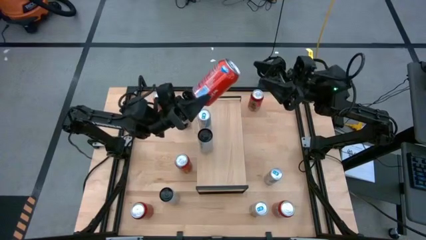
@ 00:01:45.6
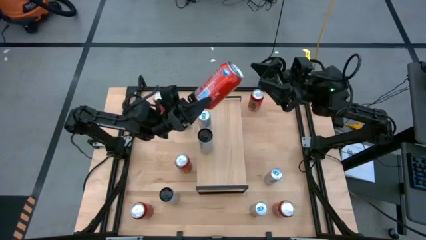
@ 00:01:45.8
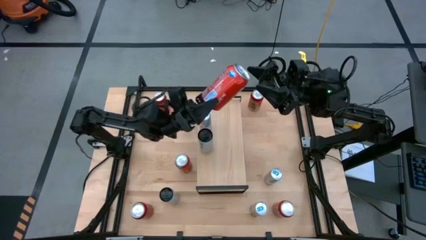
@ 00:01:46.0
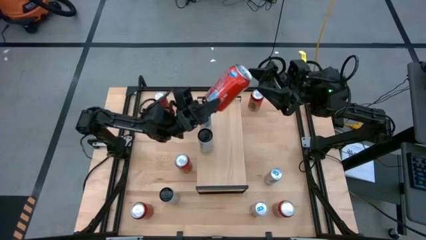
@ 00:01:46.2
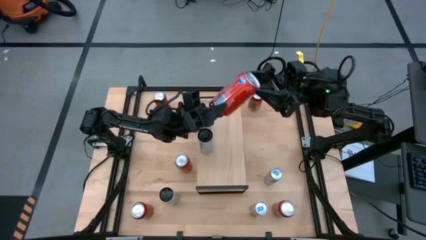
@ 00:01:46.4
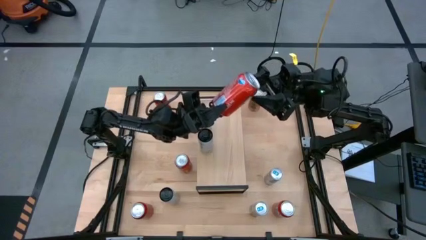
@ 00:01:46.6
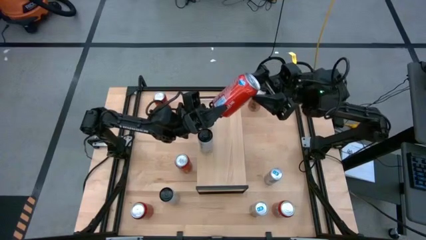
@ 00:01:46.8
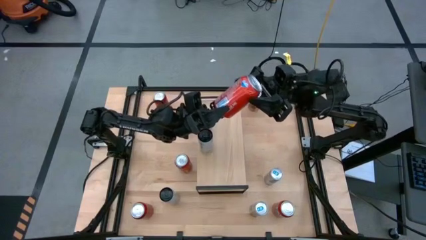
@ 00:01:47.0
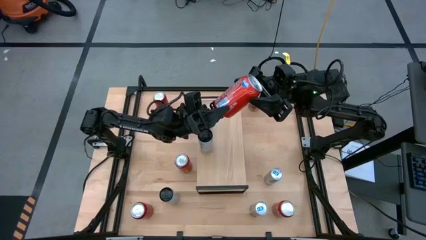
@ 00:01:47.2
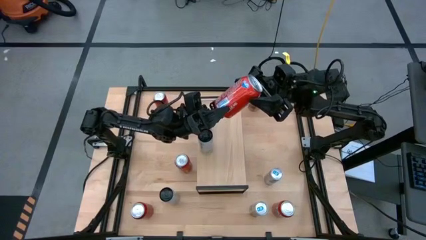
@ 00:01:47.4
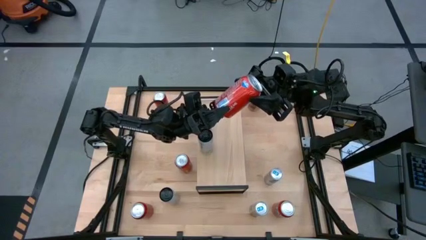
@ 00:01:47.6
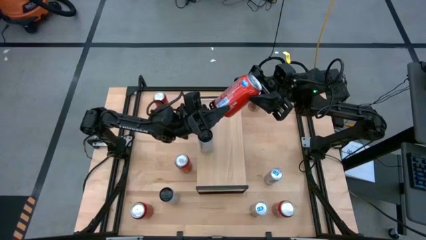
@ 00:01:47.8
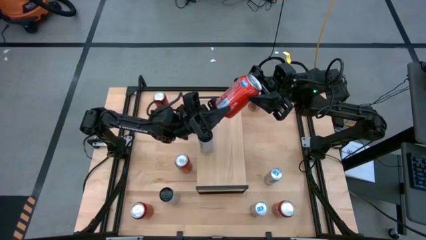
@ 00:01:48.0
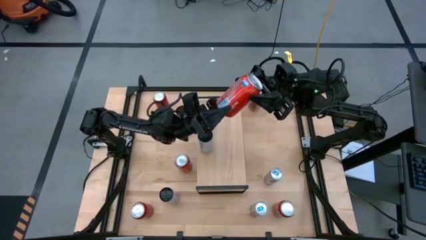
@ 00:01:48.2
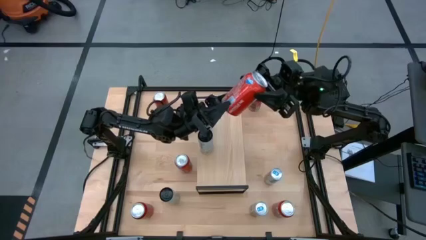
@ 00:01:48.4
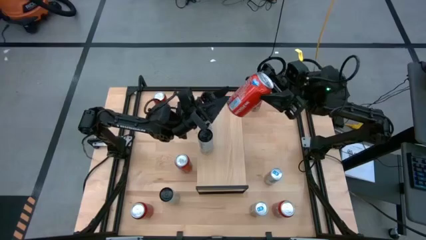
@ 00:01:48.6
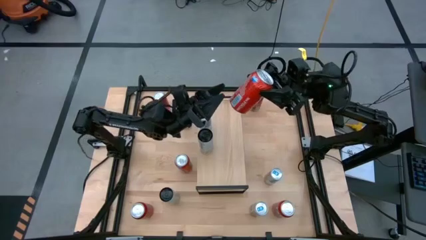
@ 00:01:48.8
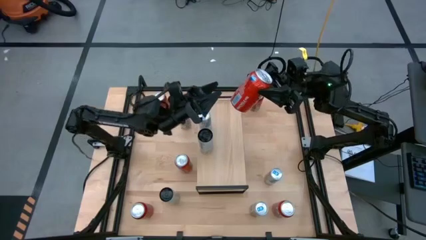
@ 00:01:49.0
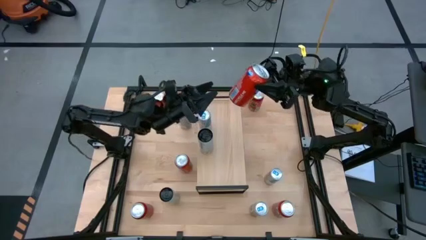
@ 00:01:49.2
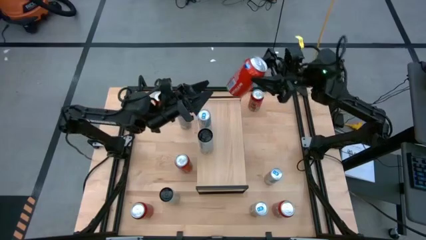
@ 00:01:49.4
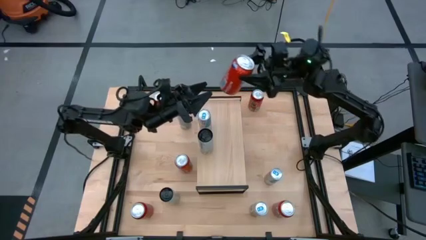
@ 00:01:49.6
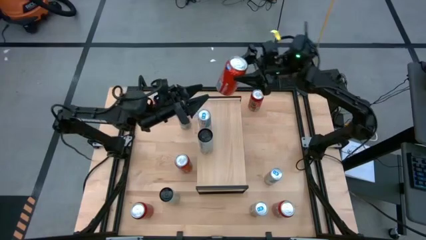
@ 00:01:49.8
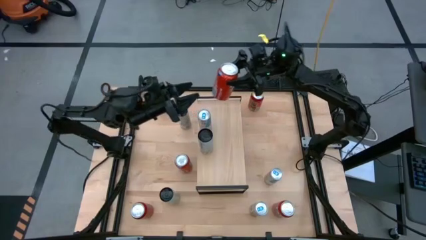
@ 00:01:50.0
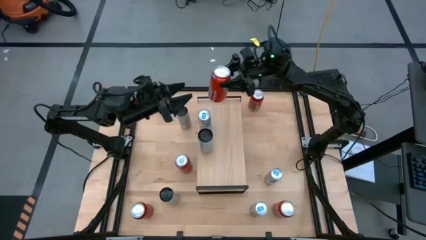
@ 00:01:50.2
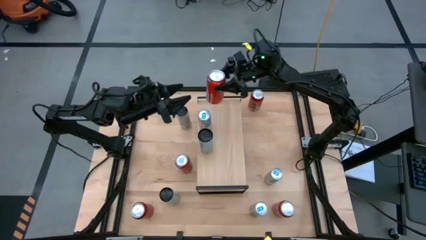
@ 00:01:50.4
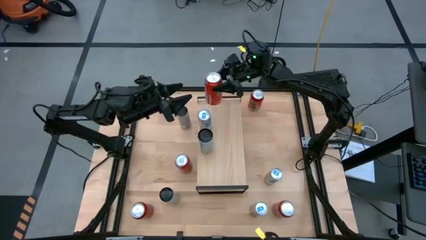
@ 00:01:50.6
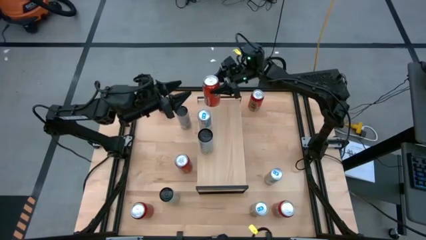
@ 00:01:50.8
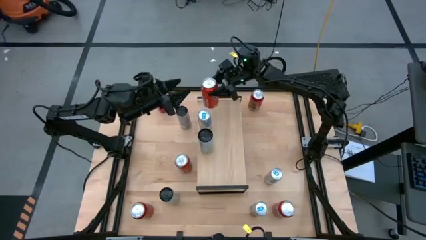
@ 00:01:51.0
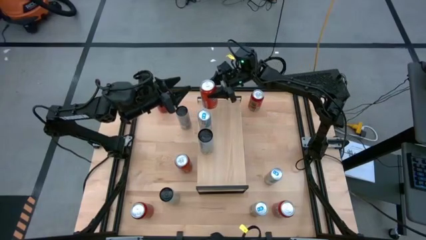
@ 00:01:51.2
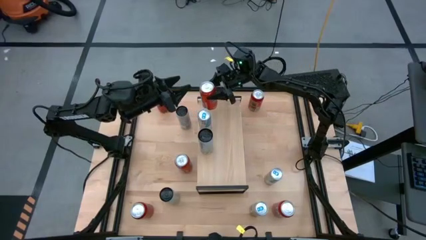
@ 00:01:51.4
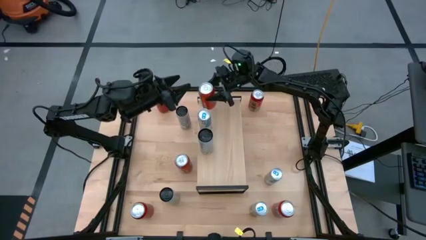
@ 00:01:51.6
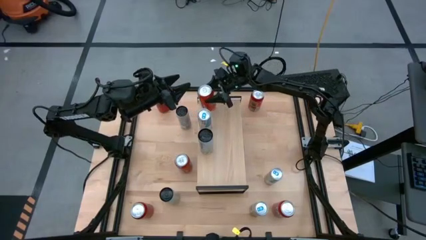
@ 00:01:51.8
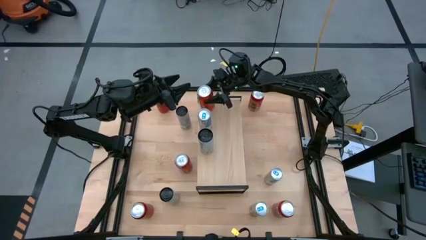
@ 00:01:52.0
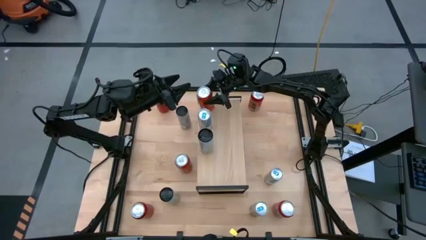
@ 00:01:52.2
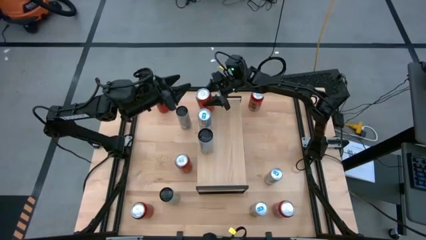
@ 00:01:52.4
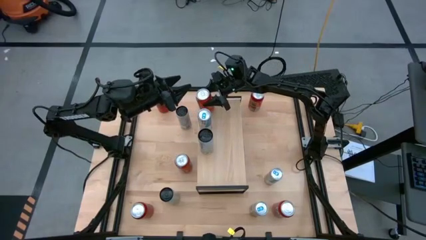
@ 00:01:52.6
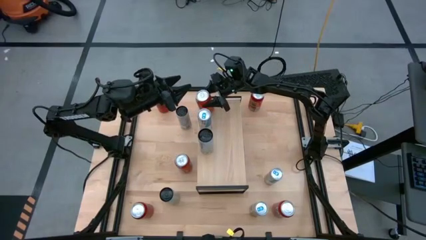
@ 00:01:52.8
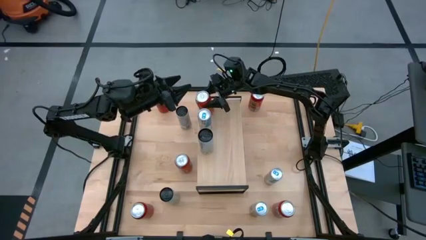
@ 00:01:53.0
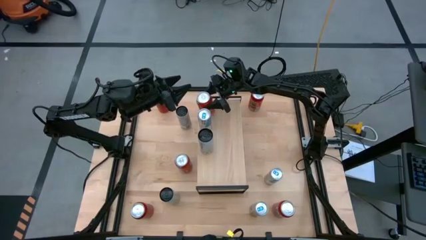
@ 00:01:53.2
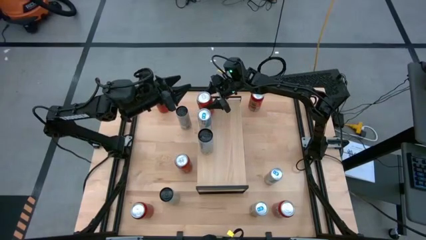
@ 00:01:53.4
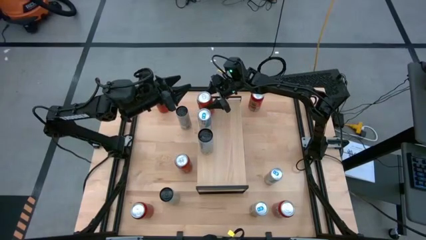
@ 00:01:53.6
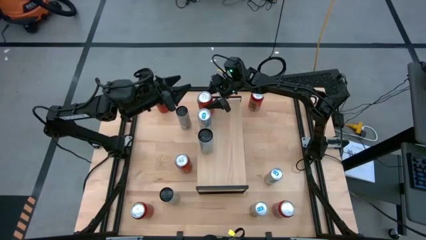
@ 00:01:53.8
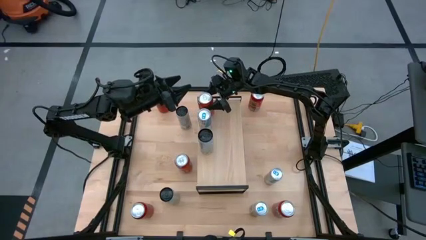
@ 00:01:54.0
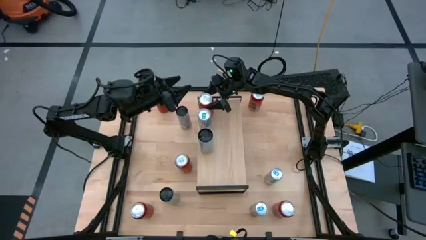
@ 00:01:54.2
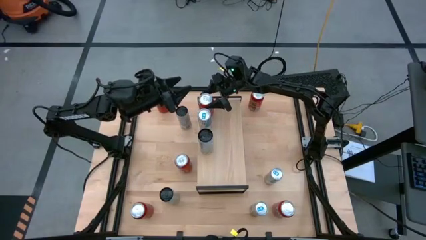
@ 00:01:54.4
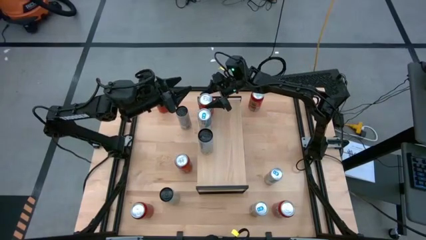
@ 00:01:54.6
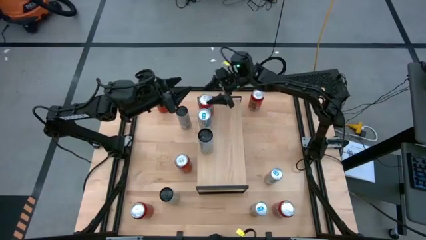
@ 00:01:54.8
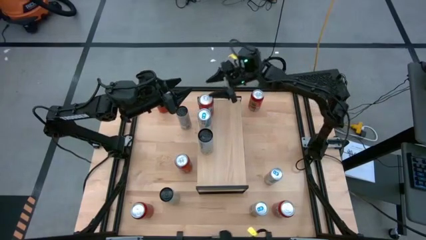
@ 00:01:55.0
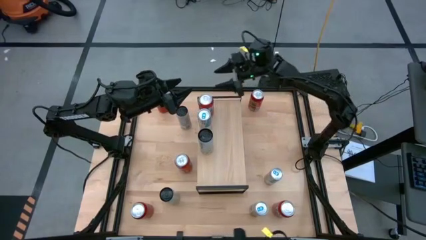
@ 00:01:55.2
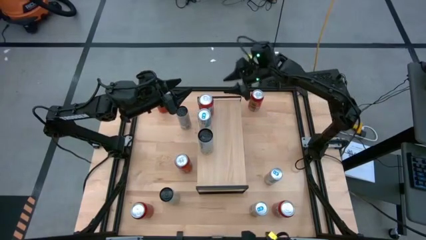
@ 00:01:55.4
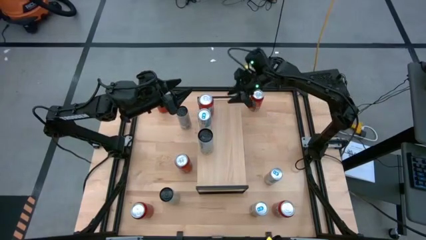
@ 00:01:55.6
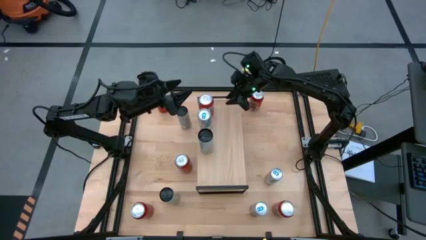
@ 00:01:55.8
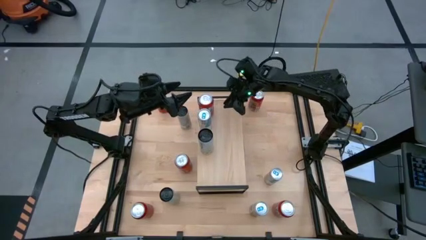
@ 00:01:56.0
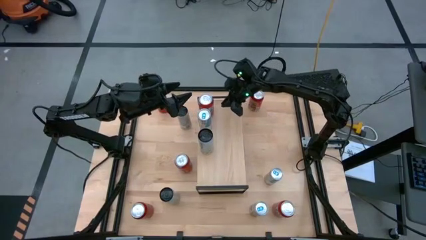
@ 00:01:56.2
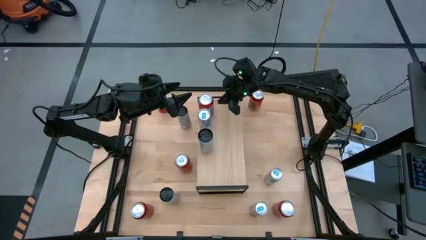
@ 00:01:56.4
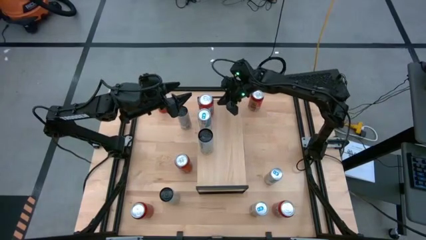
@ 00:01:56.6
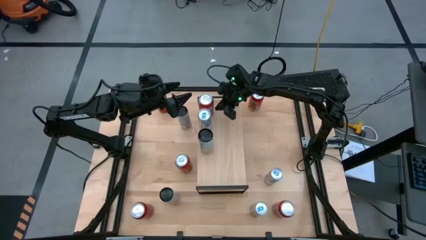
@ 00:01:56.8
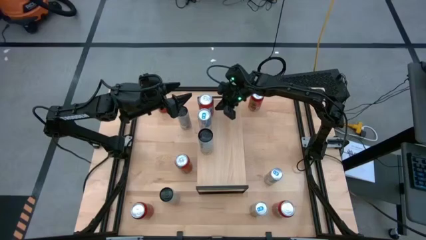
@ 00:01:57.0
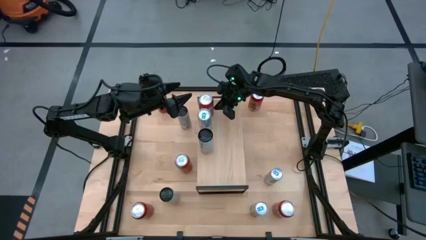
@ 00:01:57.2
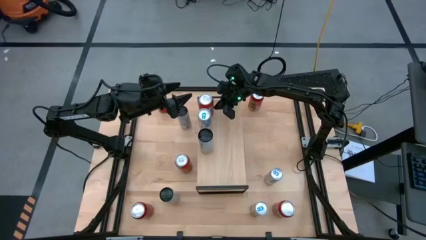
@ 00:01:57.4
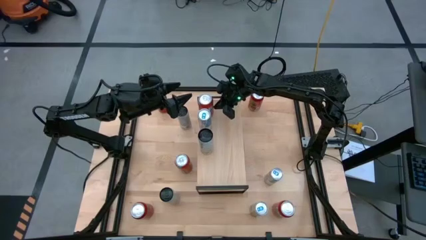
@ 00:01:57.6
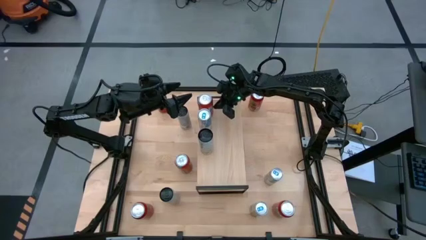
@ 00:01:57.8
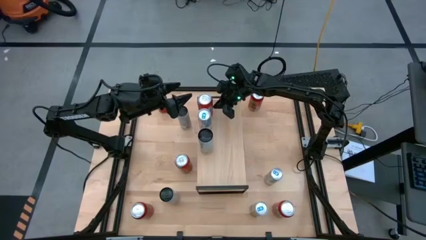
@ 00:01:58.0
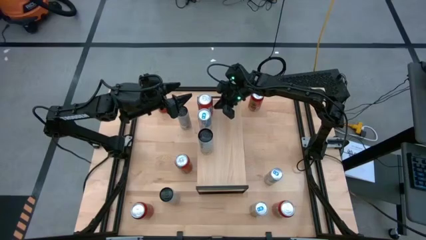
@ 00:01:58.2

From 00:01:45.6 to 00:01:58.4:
Task: Place canned beverage on shelf
Put the top right orange soda can on the shelf

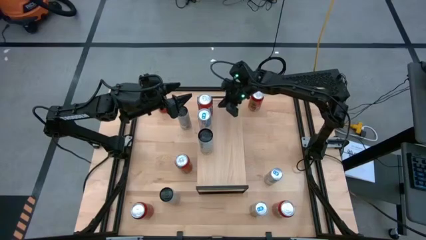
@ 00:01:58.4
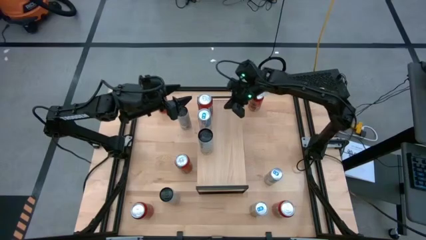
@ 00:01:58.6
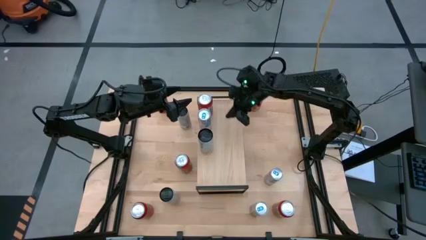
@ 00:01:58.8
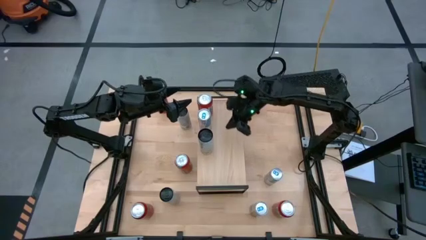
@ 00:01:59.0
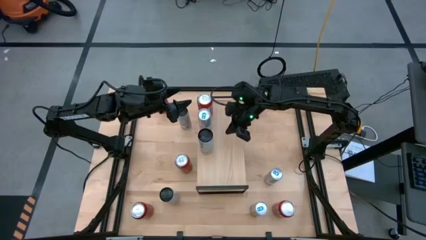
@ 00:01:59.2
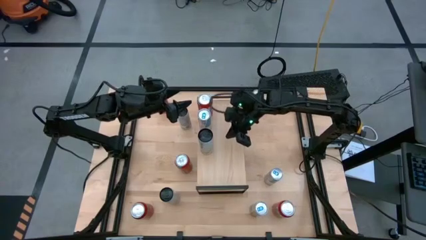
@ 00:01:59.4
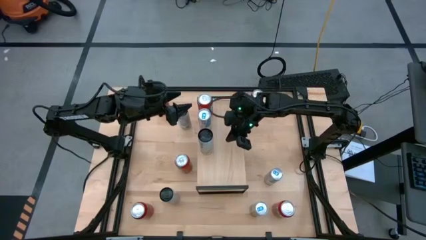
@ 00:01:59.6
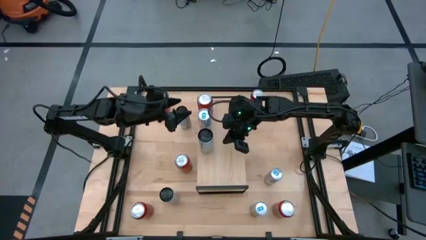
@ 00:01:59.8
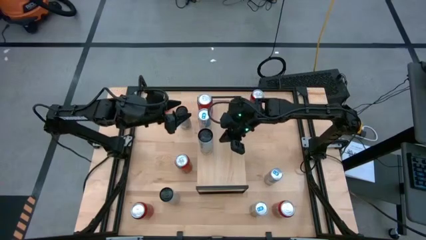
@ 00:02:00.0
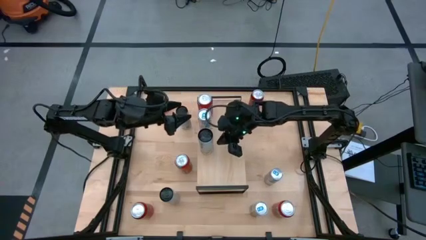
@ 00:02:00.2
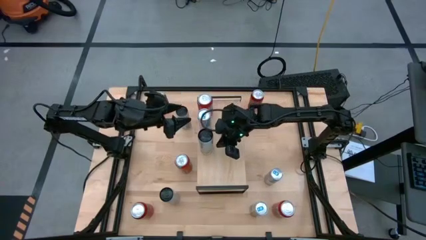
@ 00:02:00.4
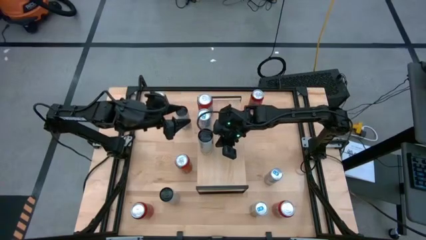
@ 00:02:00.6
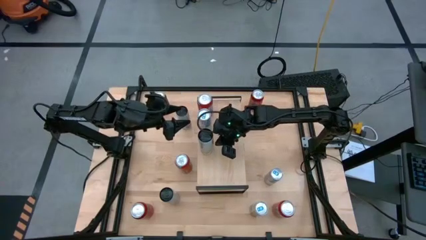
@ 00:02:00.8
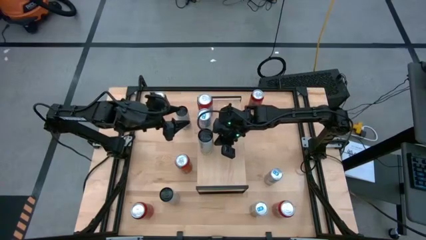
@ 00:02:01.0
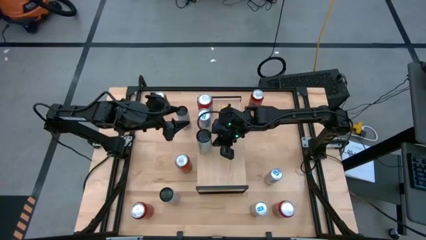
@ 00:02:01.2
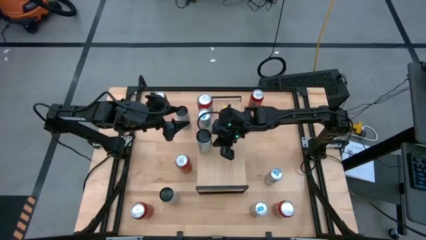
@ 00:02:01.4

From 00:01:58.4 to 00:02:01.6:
Adjust the white and yellow soda can
